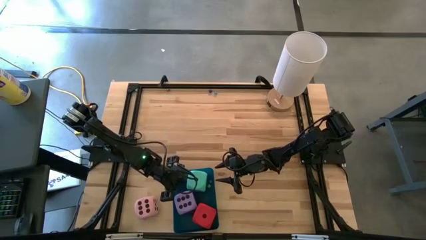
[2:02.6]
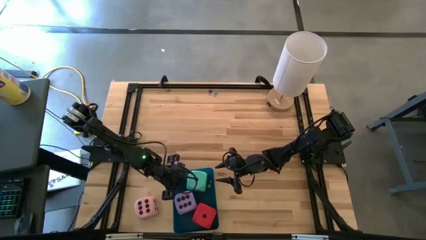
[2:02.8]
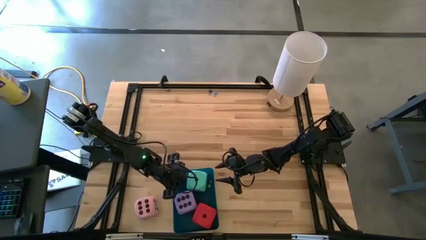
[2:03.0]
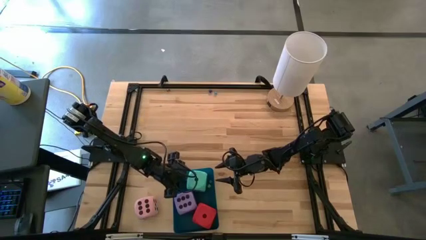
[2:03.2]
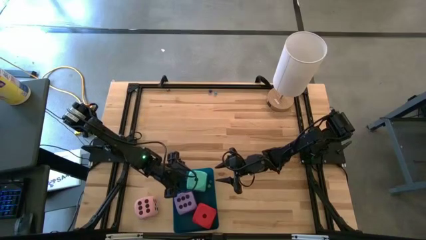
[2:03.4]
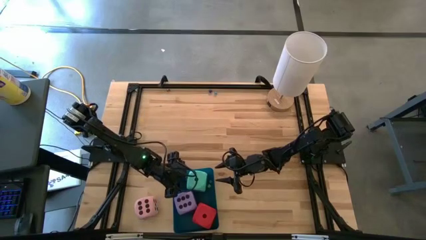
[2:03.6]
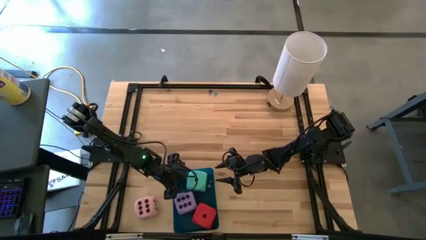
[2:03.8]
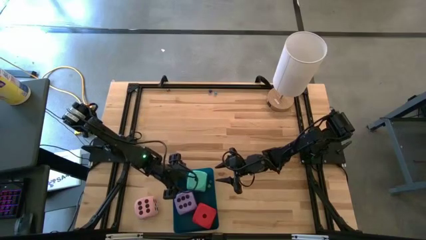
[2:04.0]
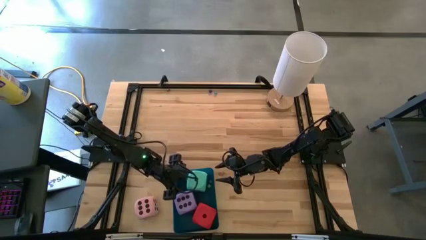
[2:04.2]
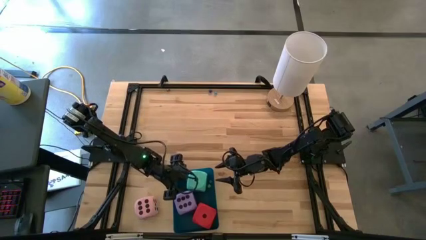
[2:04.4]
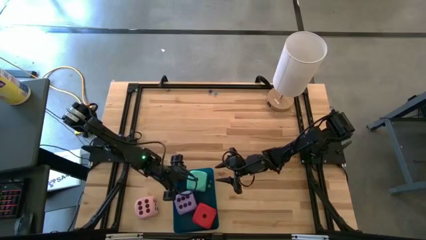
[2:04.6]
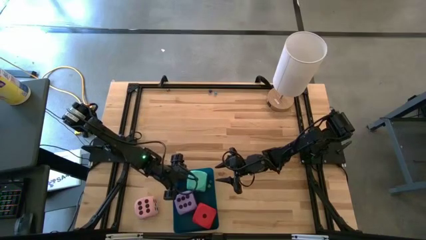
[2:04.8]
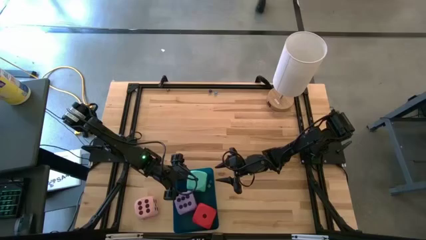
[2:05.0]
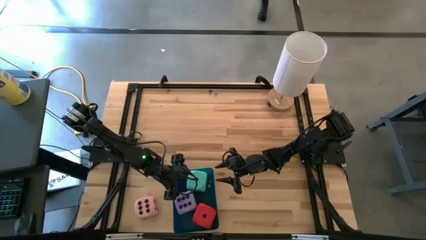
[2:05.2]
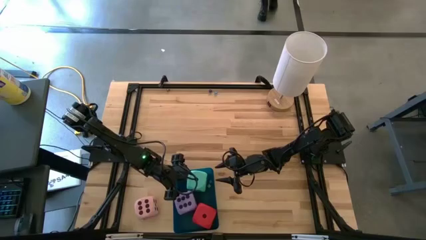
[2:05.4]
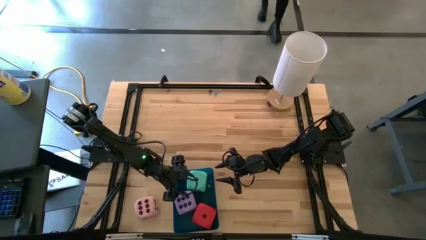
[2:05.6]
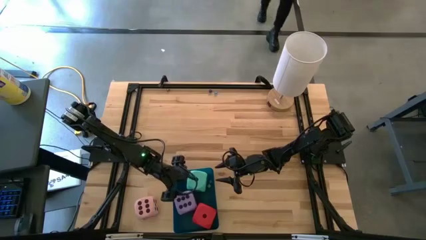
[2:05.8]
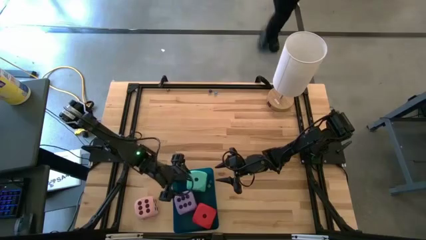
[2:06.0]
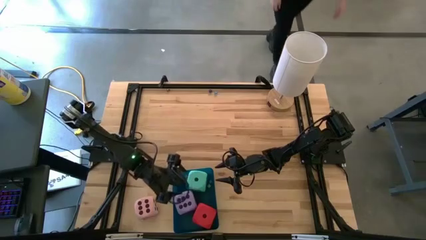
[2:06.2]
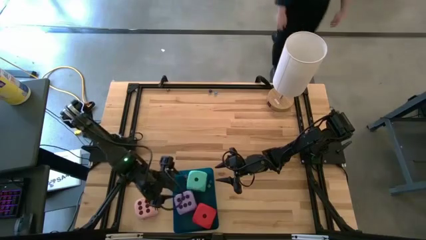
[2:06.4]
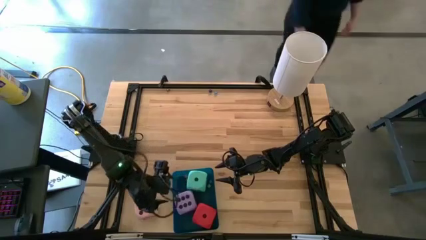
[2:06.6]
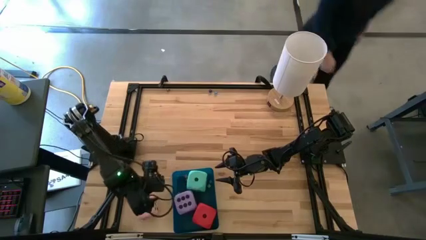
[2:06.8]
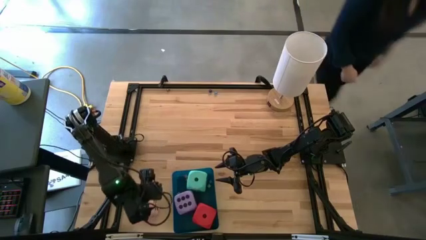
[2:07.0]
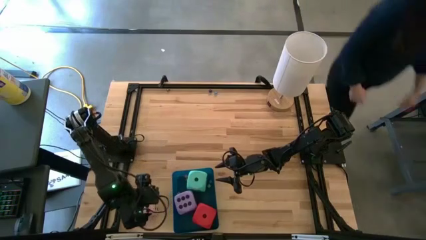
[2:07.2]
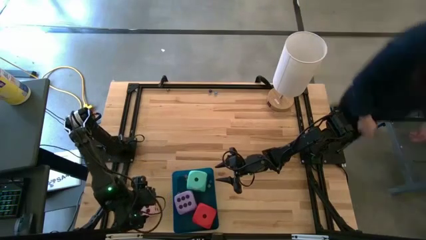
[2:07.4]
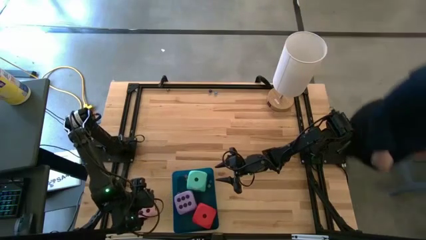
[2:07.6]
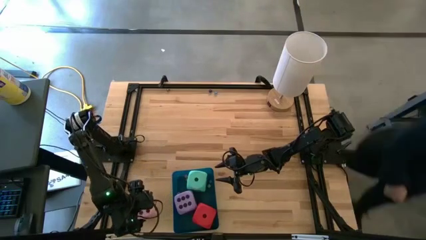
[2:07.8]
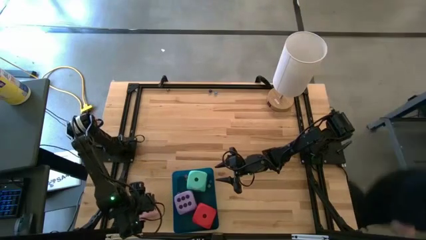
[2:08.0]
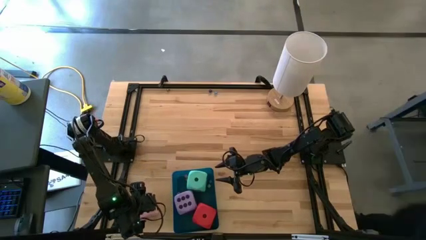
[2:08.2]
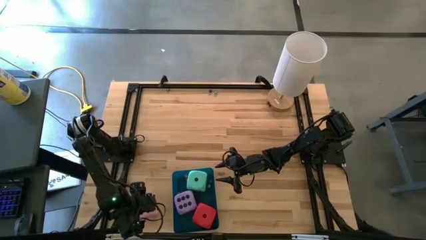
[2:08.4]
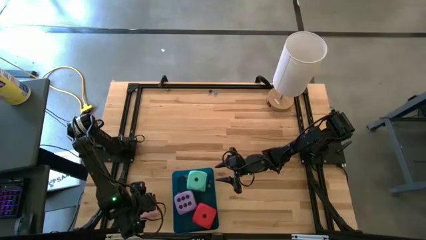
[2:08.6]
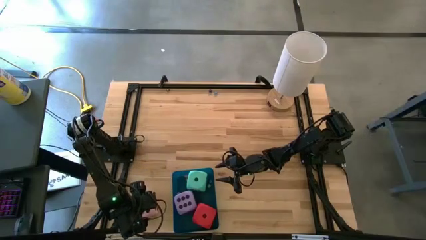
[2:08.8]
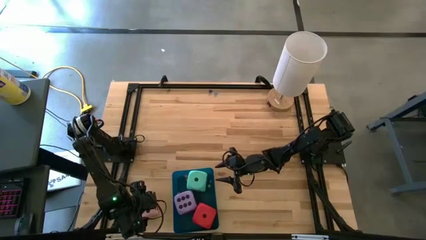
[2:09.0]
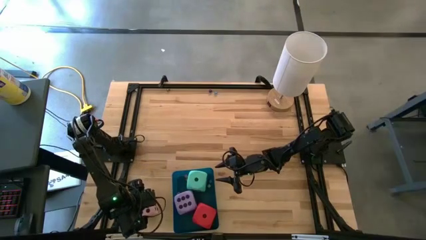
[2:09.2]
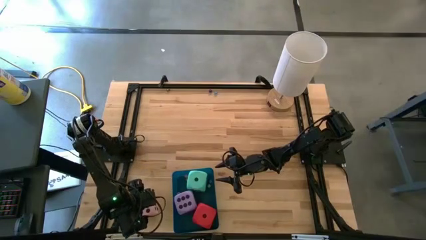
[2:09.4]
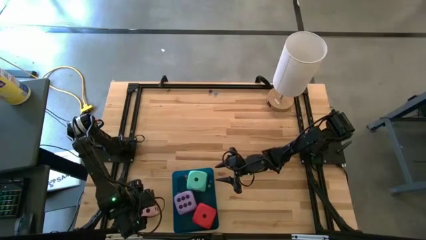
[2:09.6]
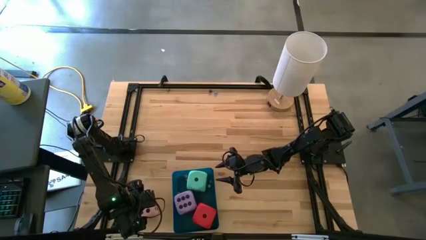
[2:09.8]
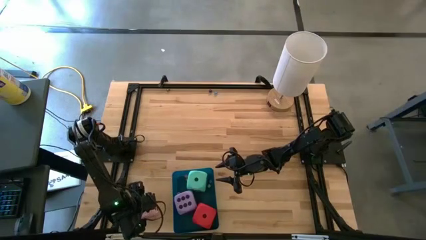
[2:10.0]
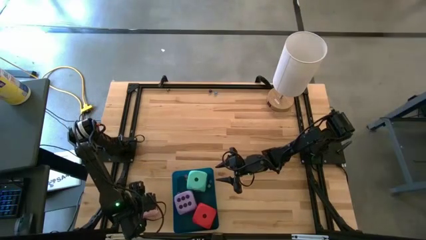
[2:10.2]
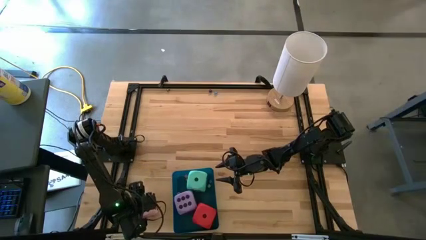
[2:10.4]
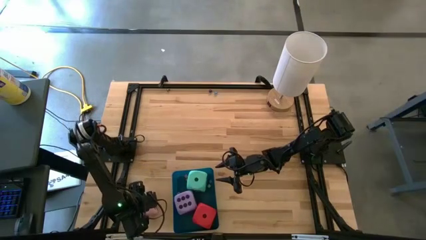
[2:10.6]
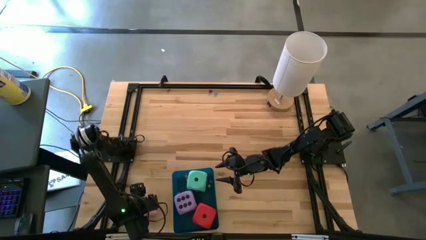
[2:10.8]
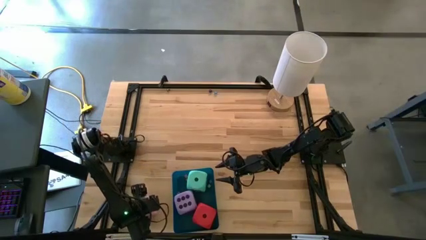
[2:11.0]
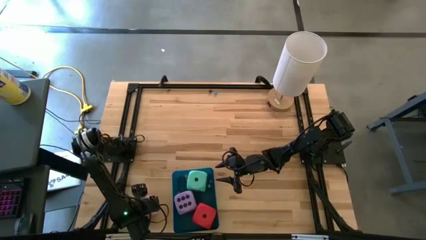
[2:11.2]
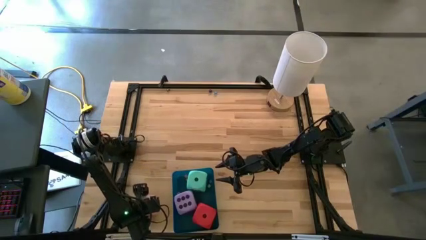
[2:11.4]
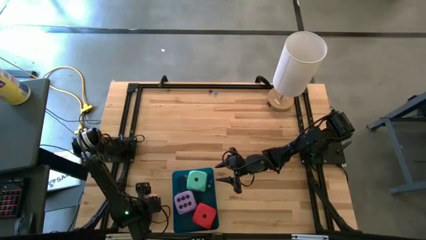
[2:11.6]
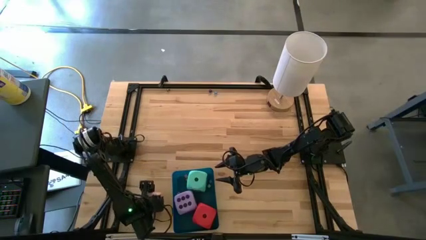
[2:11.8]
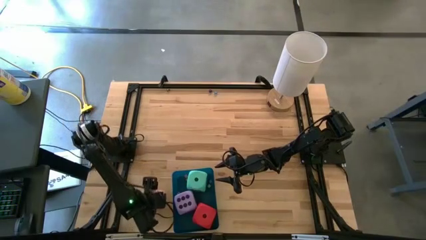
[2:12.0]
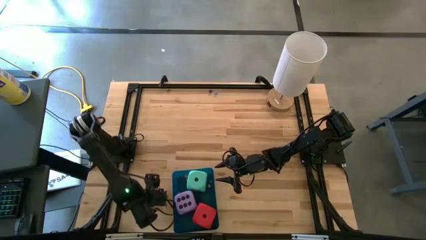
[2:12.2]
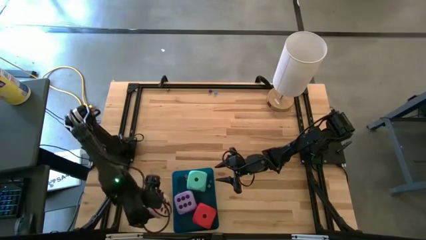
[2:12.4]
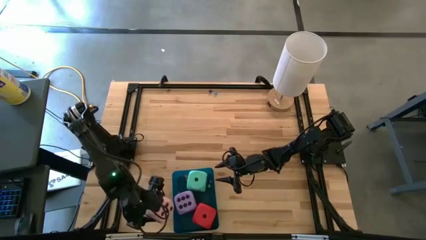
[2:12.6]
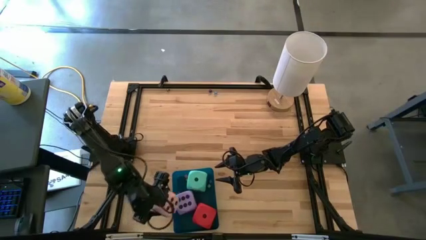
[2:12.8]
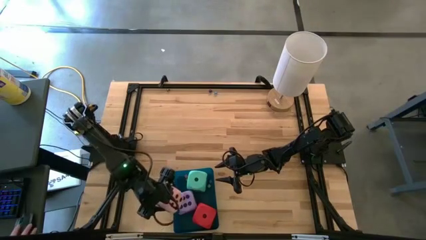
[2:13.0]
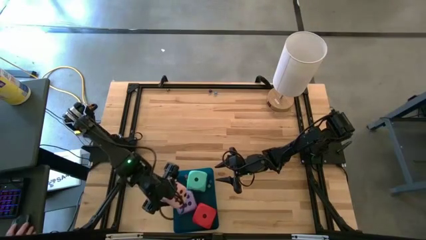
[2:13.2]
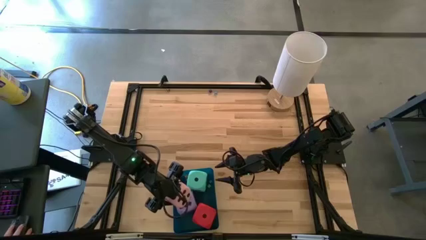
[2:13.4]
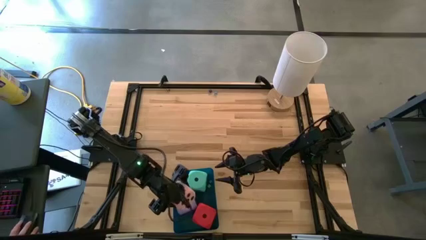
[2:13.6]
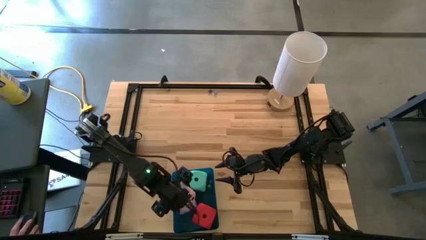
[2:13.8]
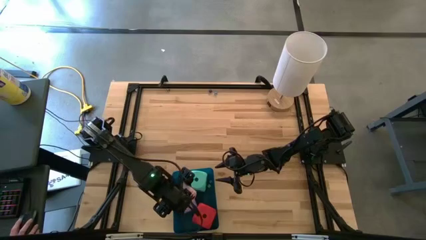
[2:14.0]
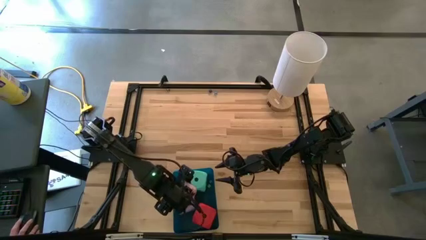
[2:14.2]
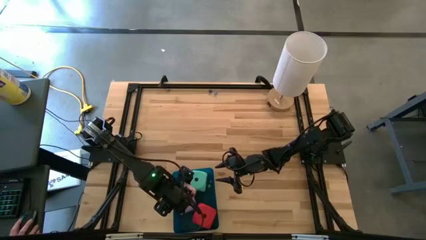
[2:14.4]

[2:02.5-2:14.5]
Task: Pick & Place Dice
Put the big pink die into the blue bin
